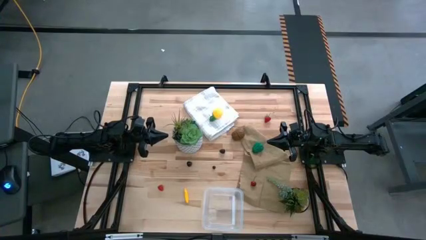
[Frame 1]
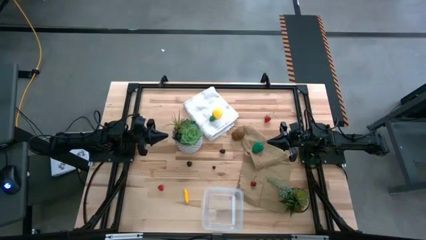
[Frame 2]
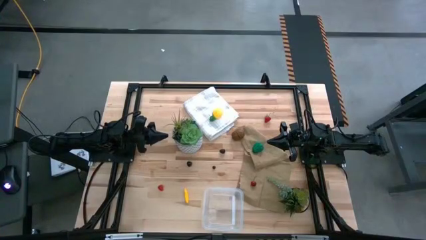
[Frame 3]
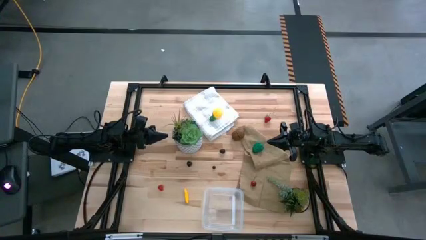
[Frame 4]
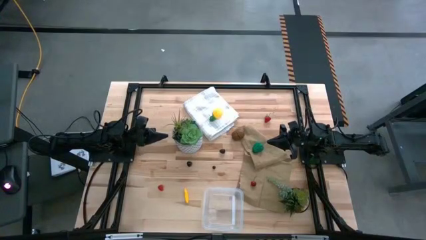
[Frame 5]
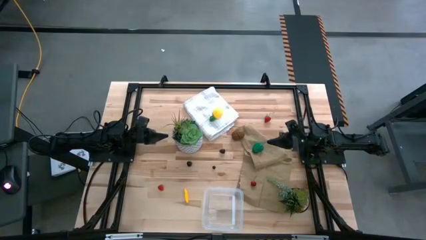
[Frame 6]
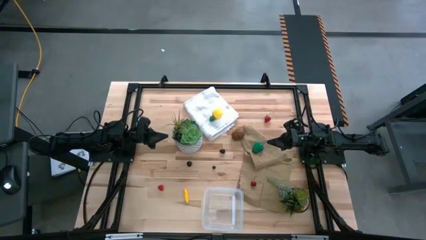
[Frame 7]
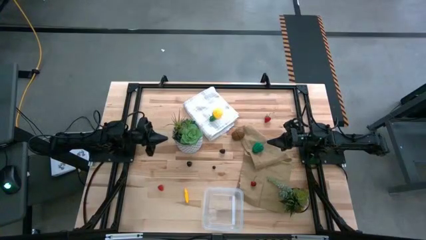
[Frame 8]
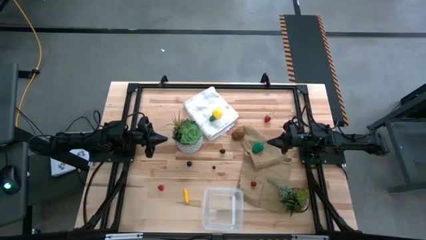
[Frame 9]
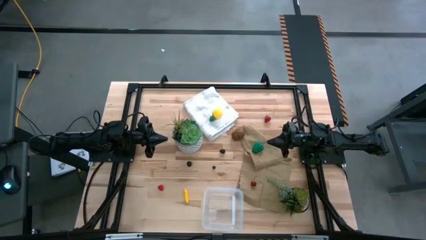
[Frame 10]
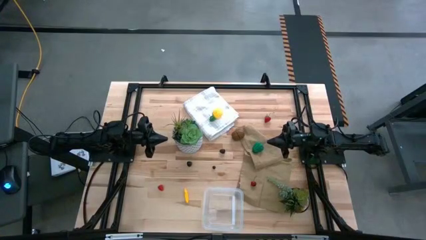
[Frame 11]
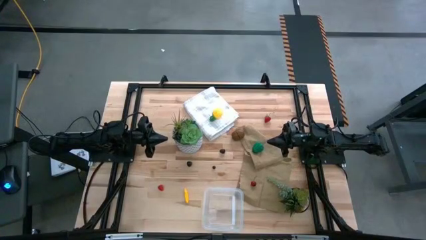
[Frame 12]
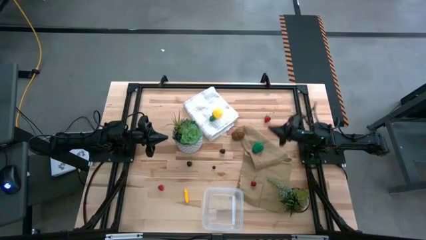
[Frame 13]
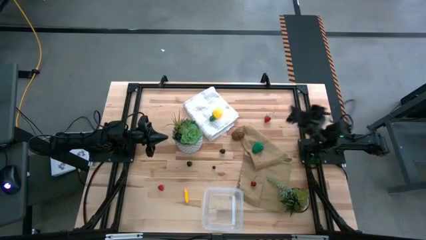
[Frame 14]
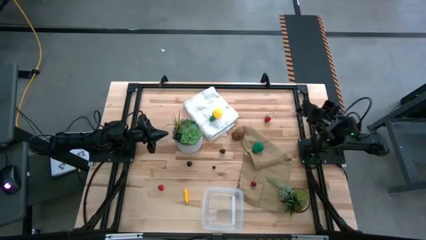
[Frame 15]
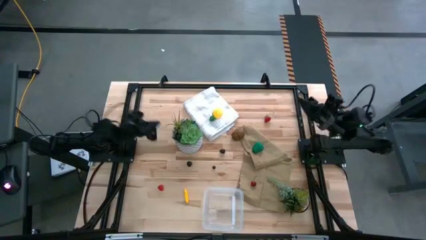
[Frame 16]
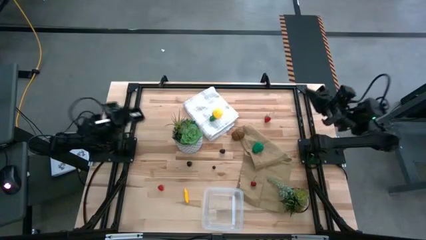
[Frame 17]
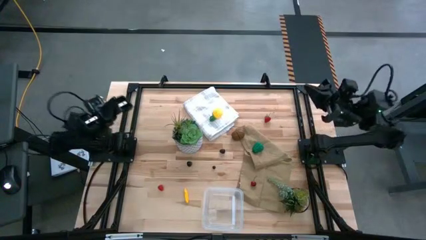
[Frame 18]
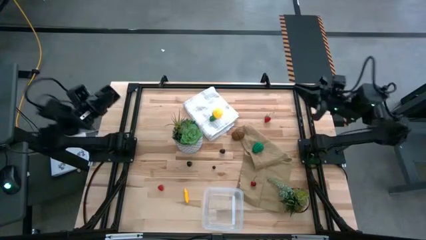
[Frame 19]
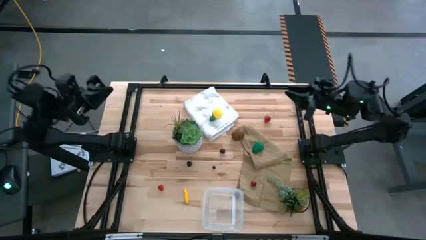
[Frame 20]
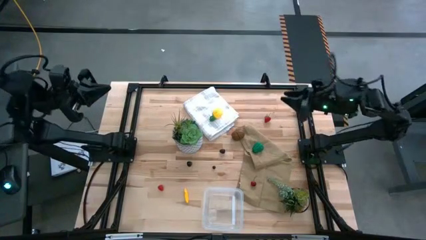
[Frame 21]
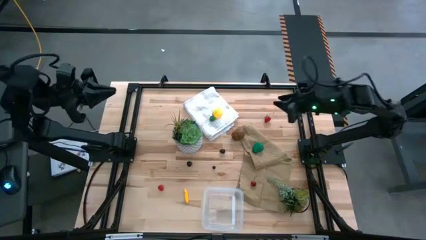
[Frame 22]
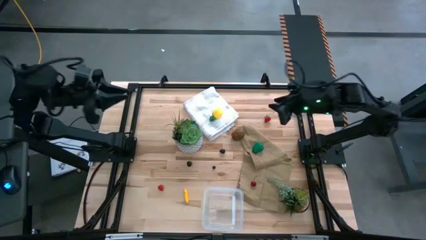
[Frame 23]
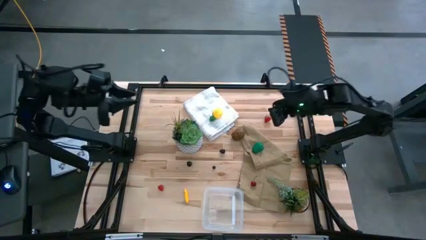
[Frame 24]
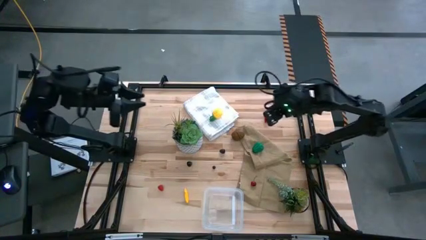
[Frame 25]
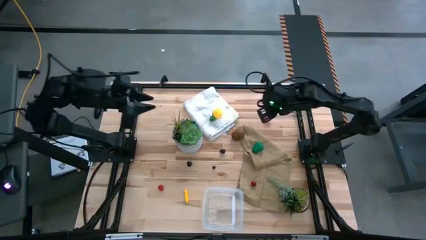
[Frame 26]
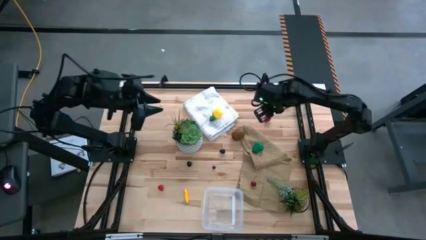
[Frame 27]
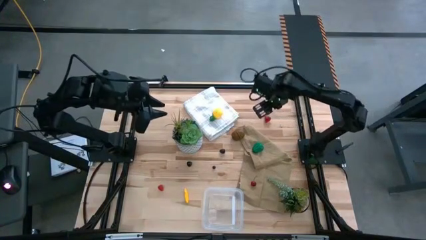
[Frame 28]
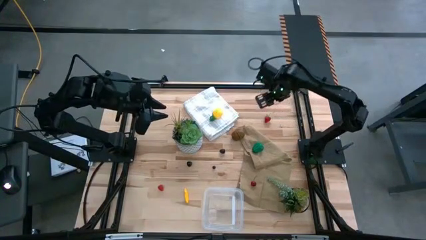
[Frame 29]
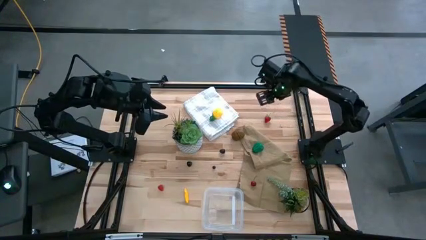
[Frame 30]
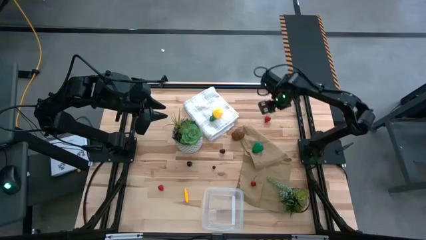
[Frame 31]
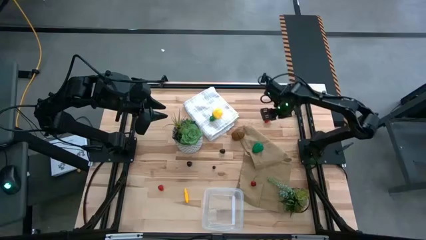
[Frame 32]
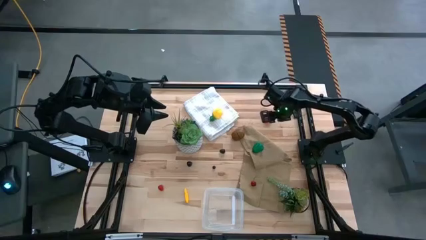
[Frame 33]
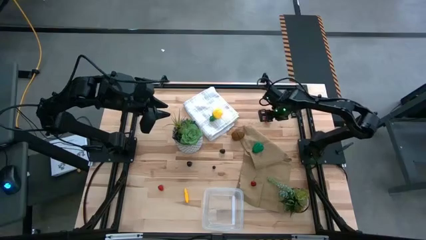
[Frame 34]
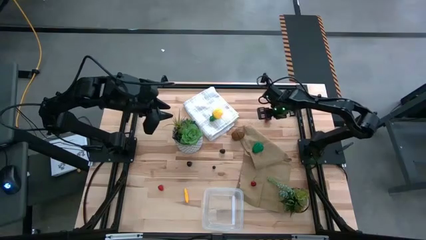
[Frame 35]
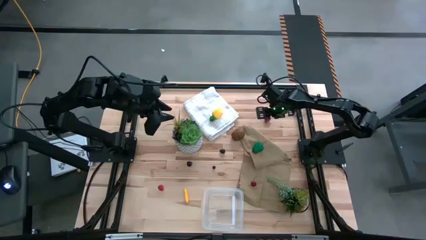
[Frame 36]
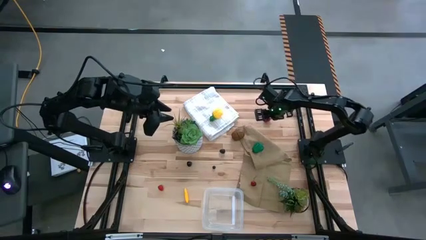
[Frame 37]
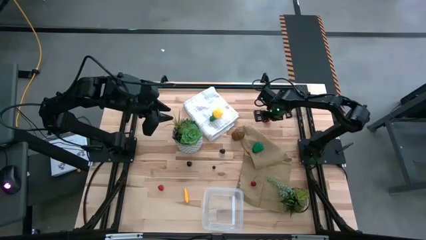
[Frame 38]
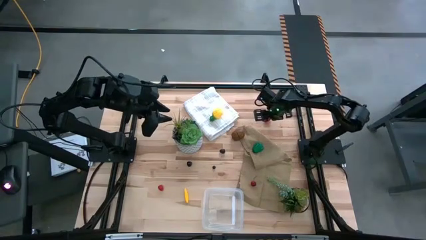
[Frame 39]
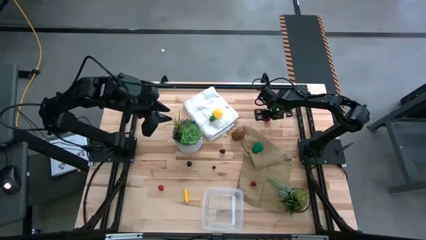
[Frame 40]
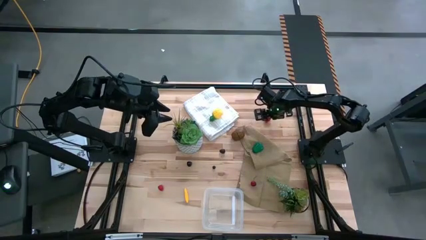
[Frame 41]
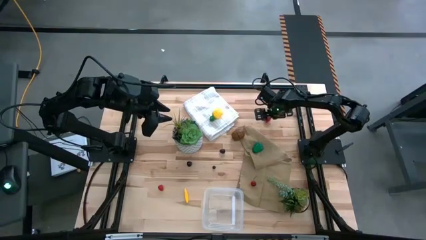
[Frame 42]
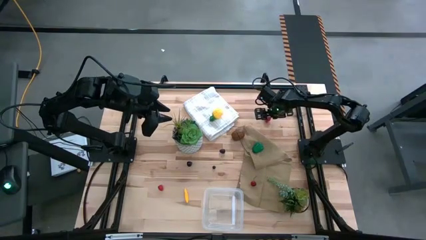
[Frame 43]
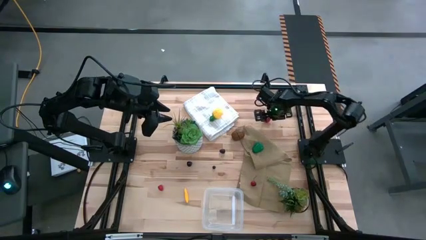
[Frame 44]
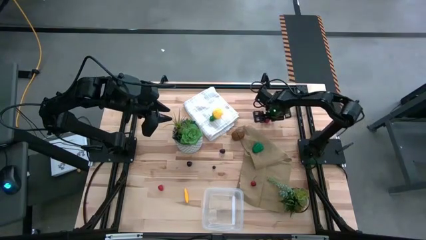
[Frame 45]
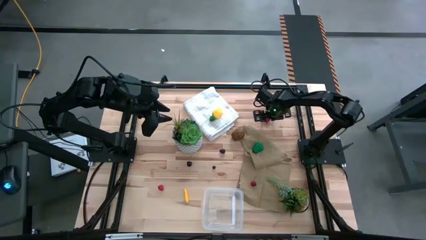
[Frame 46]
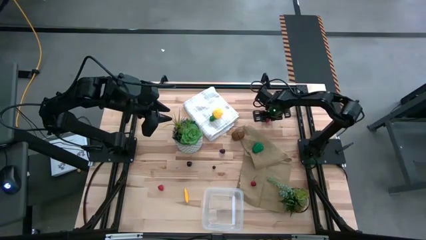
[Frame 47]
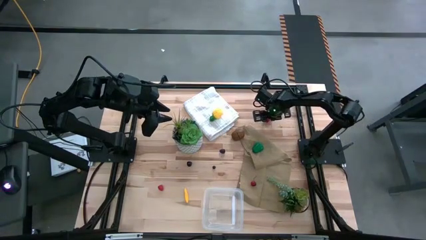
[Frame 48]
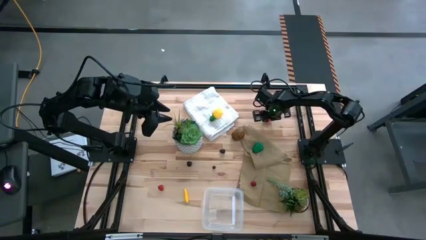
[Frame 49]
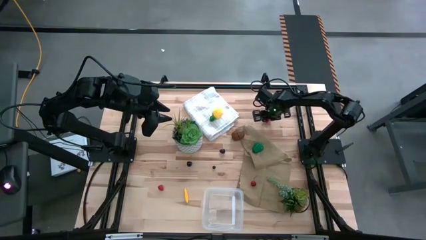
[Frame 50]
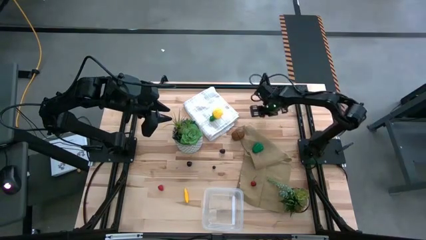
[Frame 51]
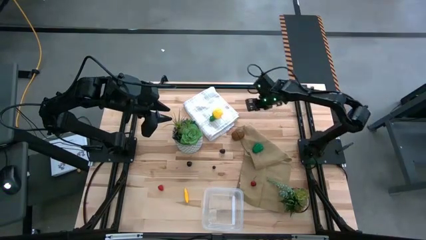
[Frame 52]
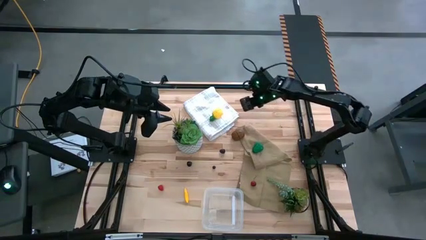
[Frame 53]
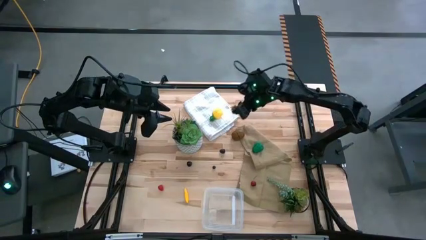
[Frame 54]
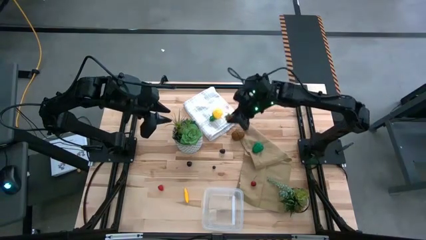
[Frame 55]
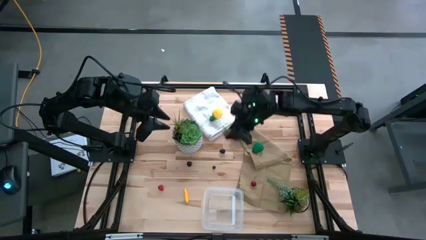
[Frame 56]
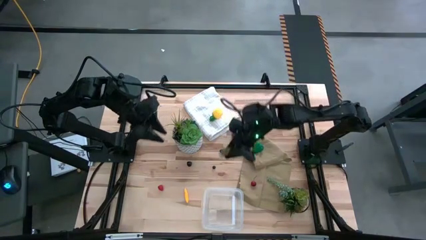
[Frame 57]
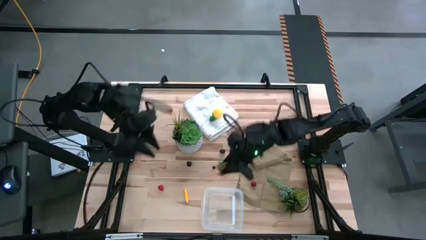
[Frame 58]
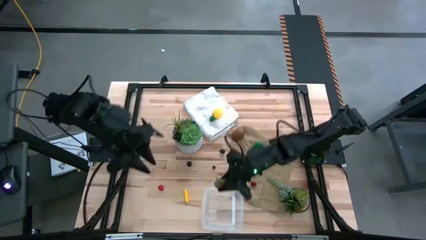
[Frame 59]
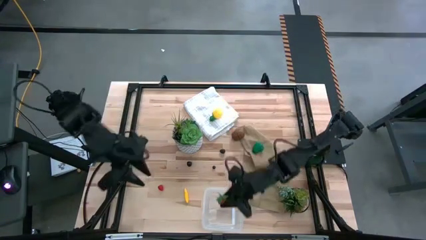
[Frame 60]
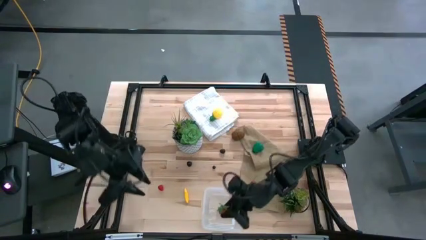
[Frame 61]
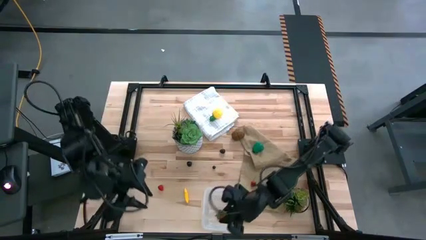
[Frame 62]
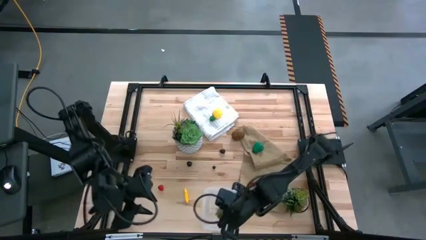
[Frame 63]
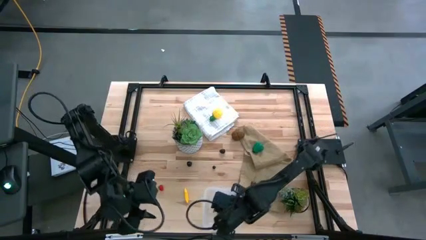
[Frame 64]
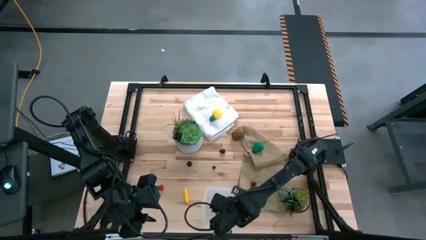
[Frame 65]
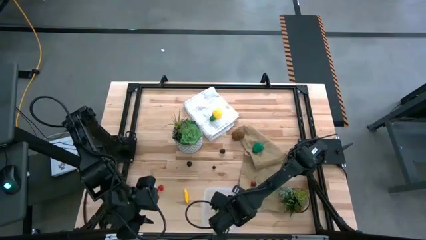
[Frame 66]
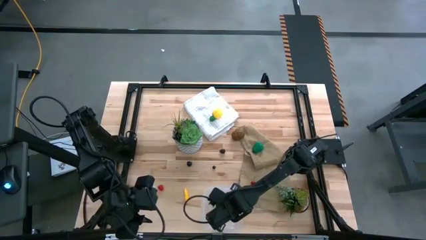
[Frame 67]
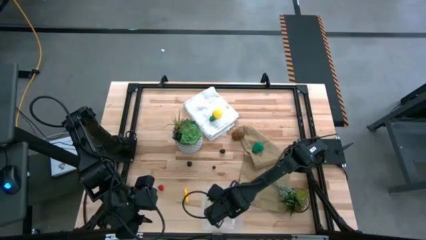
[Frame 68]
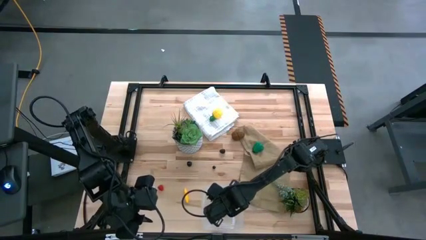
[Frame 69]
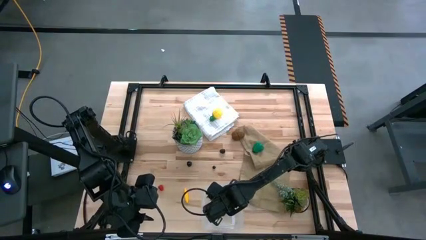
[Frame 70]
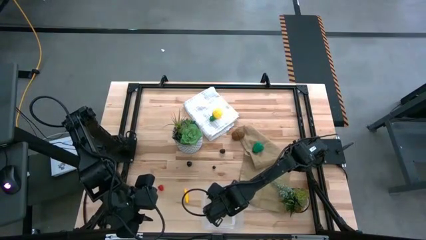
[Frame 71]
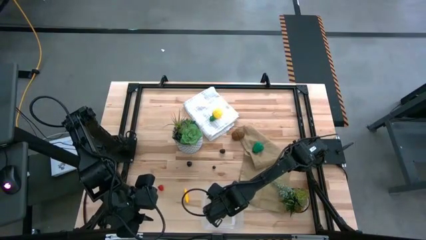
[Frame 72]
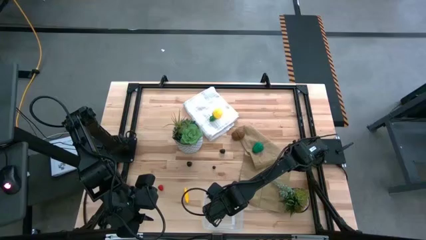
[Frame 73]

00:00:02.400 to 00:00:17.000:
Task: Pick and placing Produce into tupperware
Put the top red strawberry into the transparent bin
